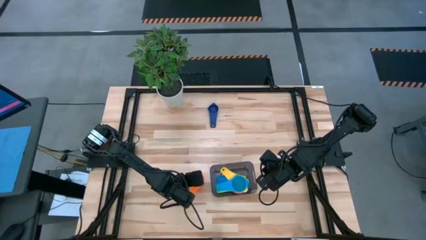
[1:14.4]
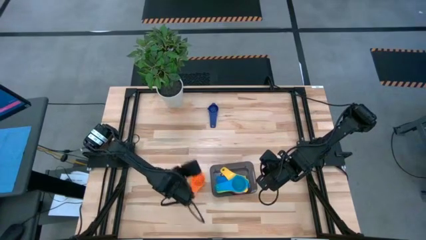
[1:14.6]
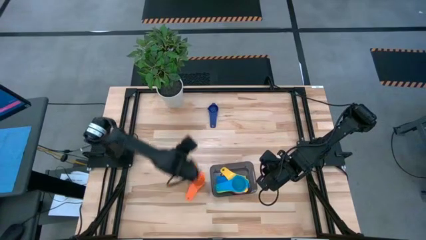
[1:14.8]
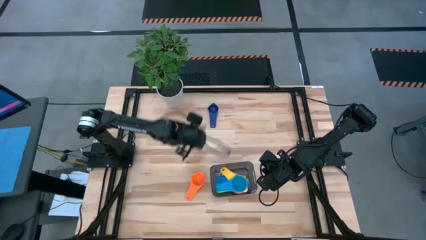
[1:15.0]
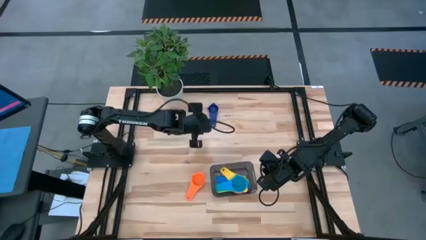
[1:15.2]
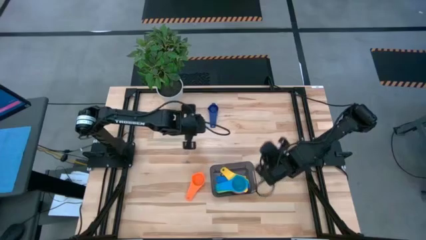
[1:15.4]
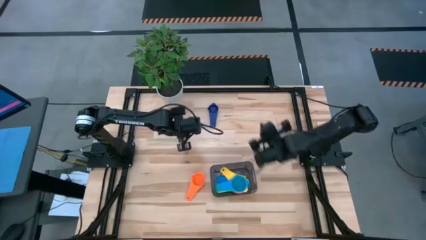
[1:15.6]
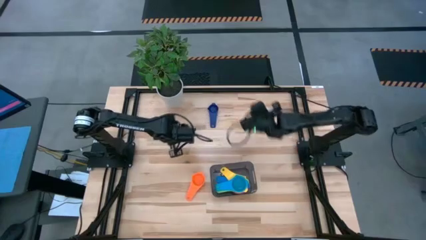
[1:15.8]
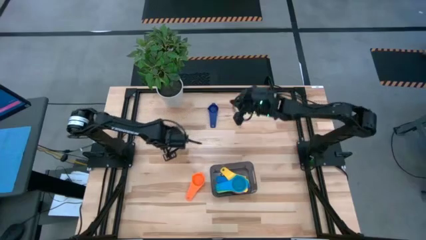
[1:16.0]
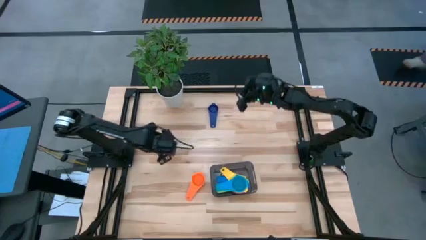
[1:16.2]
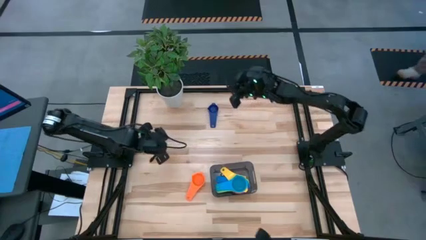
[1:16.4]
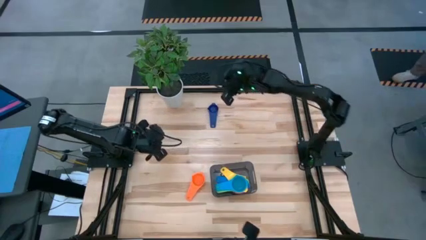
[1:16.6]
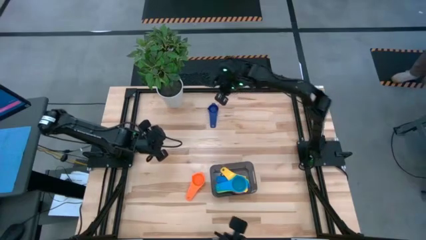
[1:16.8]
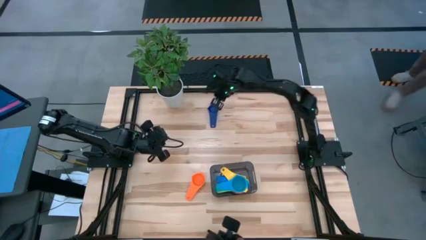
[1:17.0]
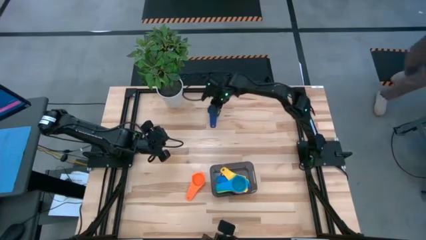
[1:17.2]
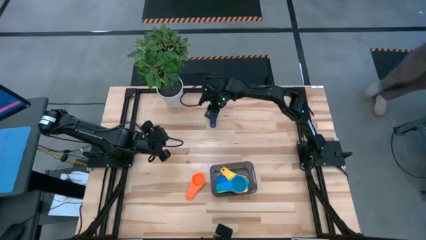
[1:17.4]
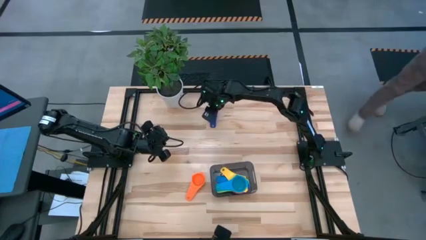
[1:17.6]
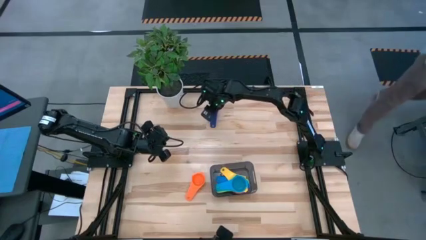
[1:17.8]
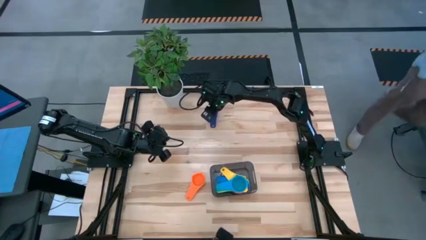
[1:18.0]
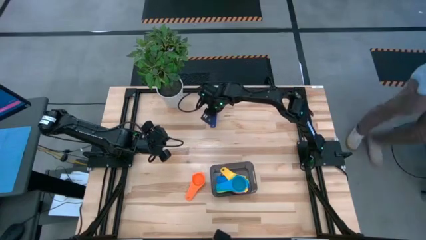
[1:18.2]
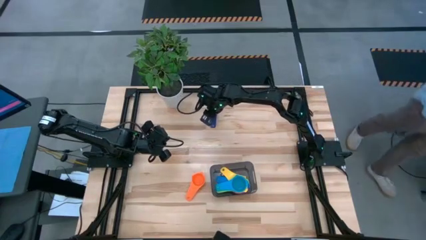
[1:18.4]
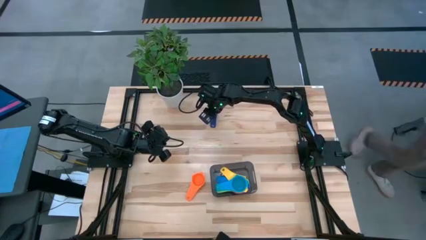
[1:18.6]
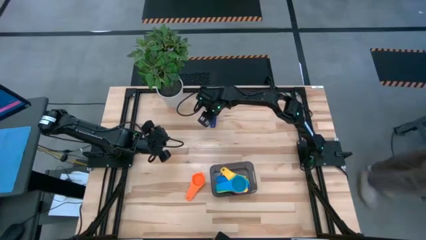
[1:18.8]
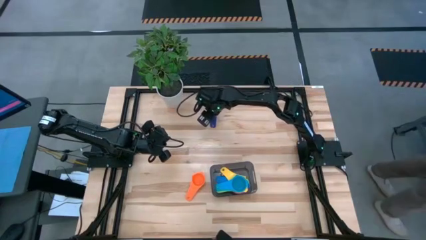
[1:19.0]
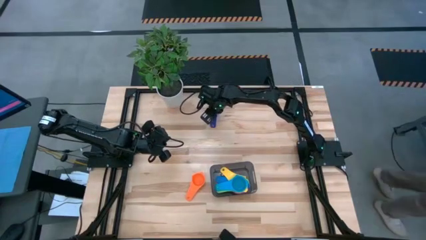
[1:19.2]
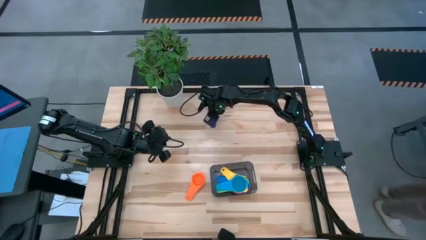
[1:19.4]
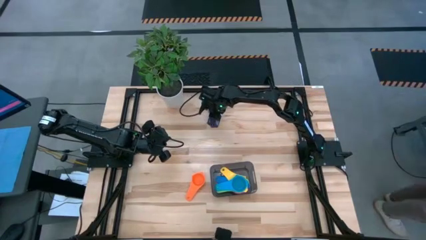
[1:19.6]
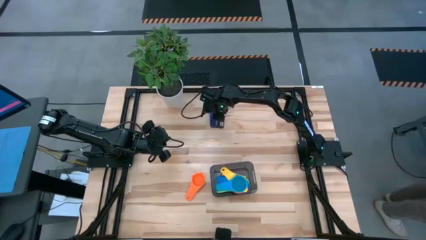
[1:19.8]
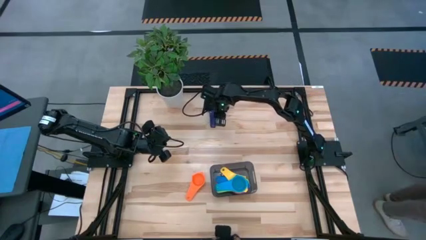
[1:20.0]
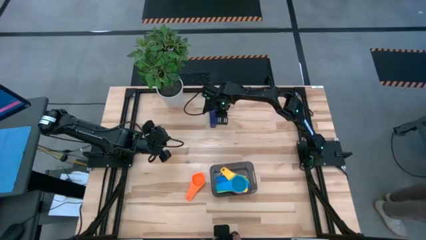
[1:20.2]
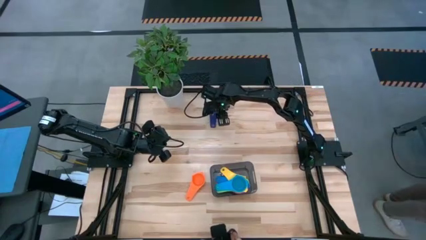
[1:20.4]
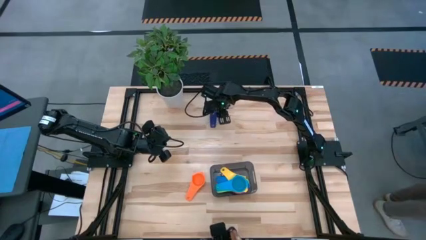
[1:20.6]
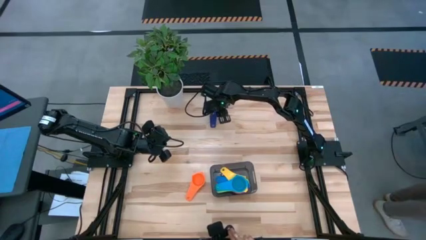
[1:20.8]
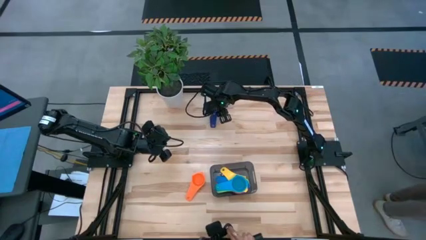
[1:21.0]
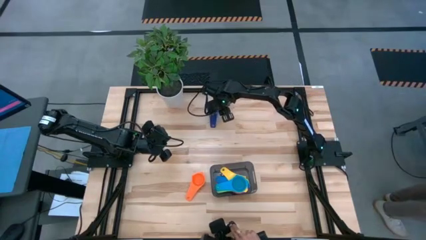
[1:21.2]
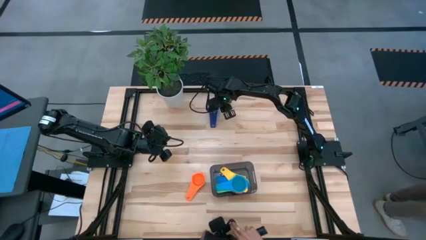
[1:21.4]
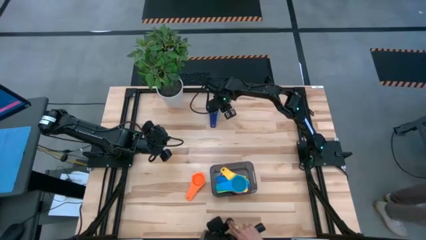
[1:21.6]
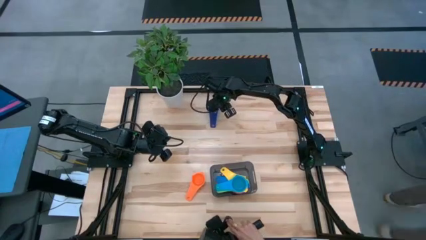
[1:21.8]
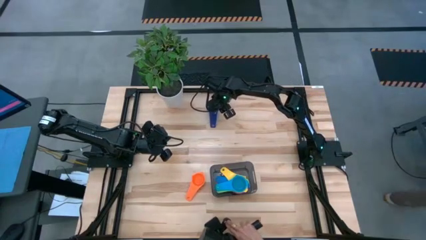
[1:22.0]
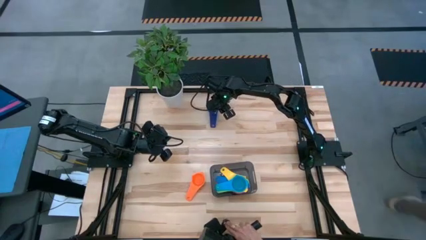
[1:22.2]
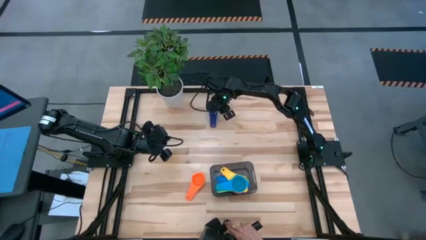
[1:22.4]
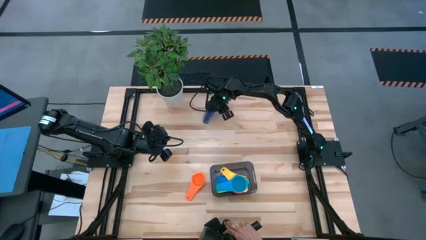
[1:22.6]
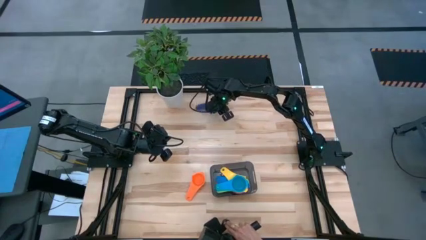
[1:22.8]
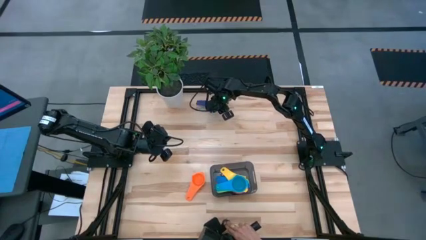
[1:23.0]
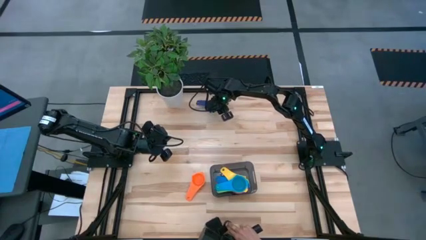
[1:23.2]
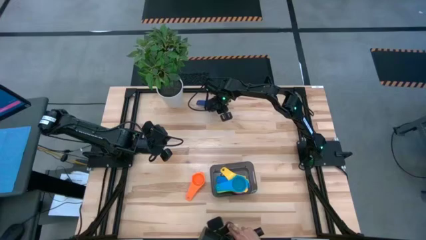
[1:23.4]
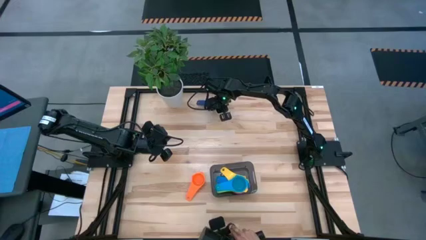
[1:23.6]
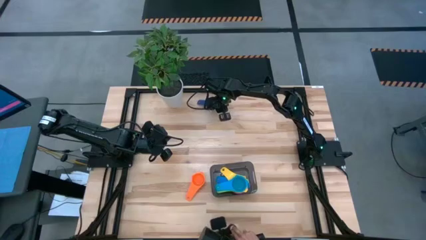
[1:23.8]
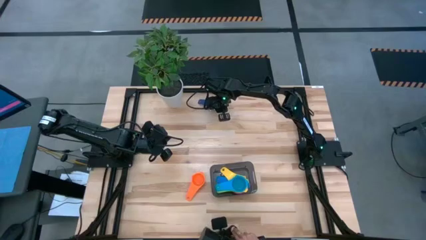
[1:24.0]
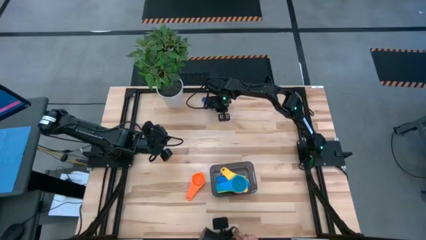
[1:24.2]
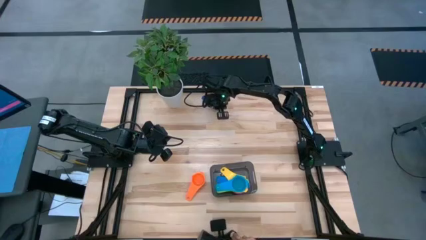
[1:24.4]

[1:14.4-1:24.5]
Task: Nest measuring cups in basket
Move the dark blue measuring cup to the top of the black bin

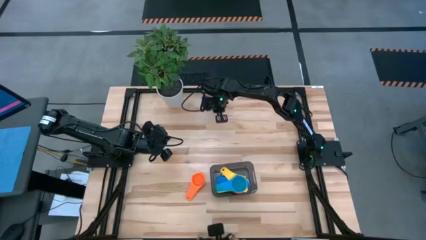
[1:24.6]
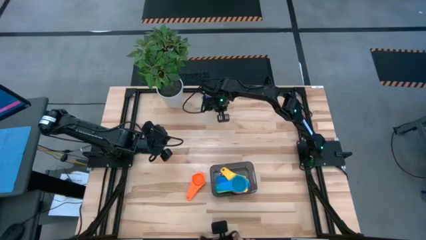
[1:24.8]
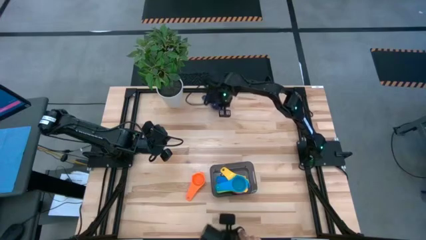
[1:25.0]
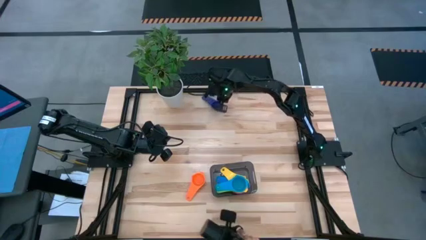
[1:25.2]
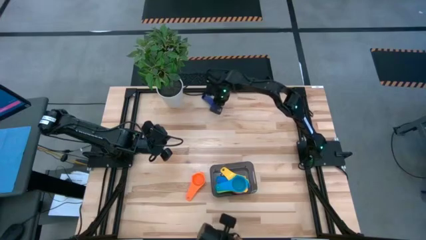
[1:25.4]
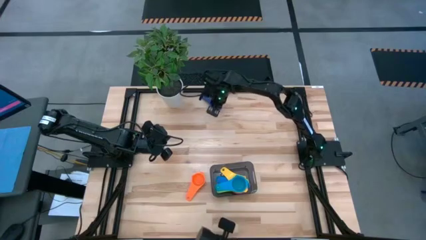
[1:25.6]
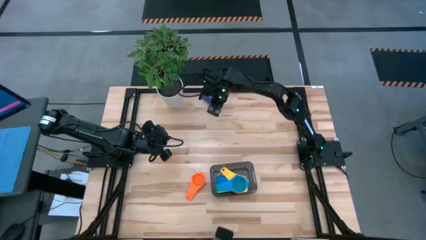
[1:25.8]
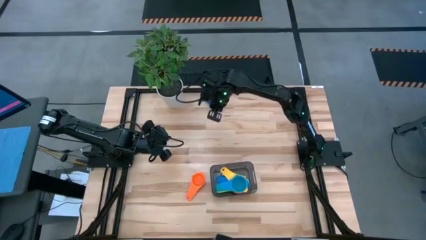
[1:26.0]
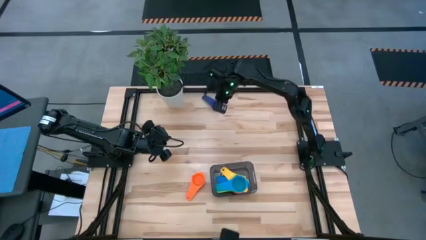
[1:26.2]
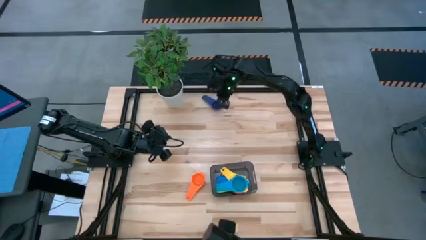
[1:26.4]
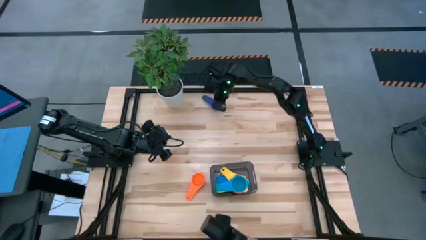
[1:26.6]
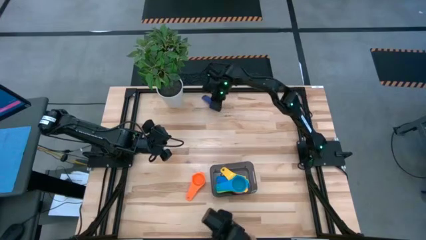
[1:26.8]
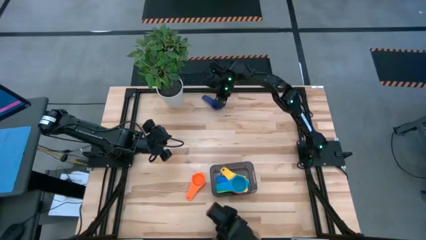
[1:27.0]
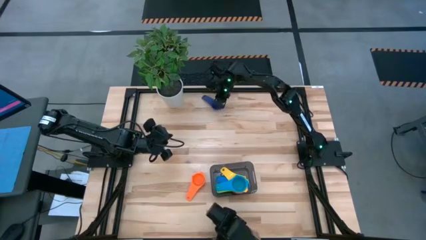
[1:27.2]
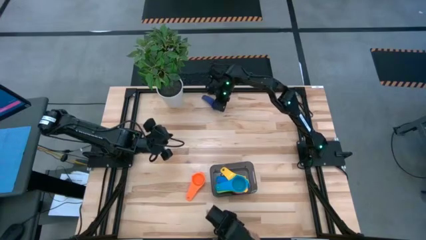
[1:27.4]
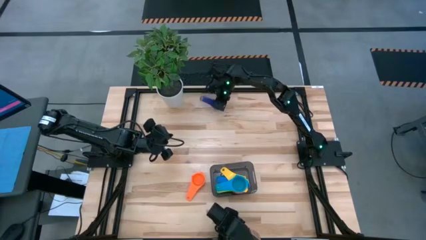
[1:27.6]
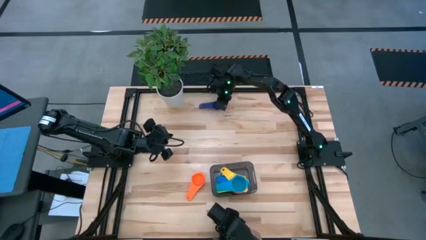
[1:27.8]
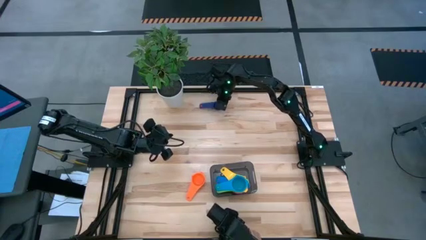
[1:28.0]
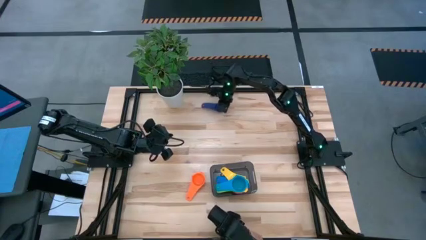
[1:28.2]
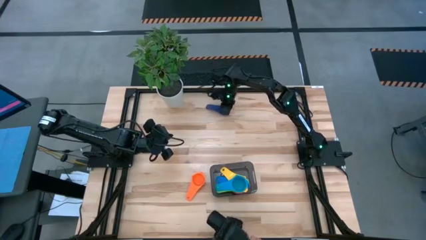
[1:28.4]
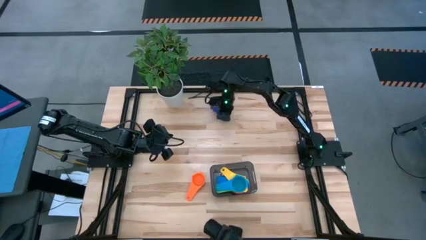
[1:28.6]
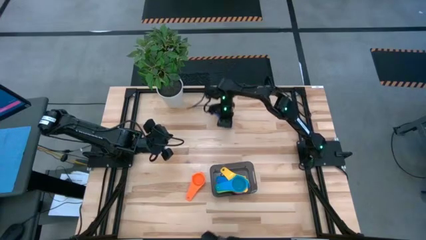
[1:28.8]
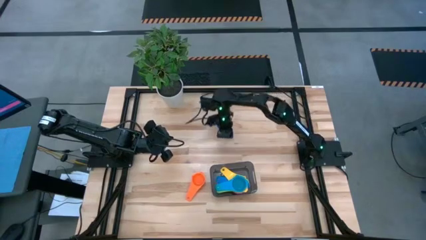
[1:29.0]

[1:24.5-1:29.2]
Move the dark blue measuring cup to the top of the black bin
